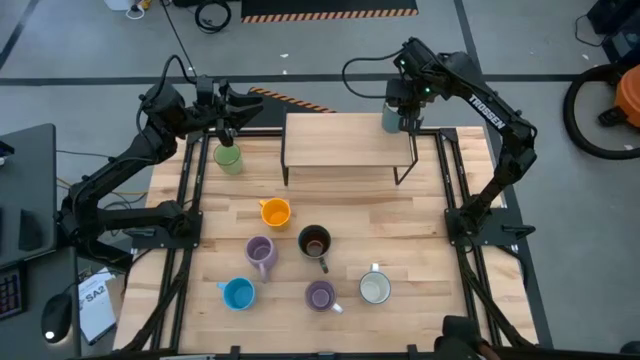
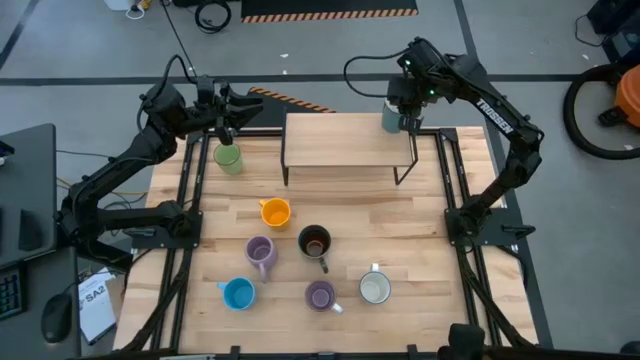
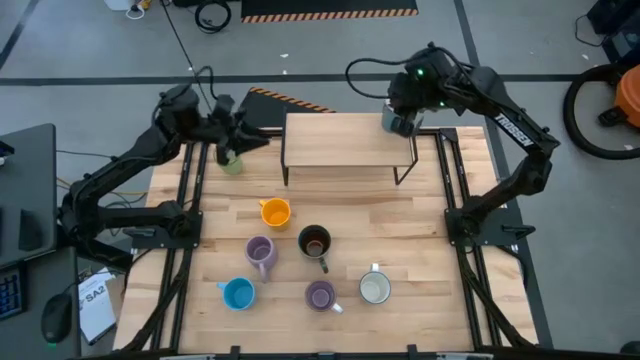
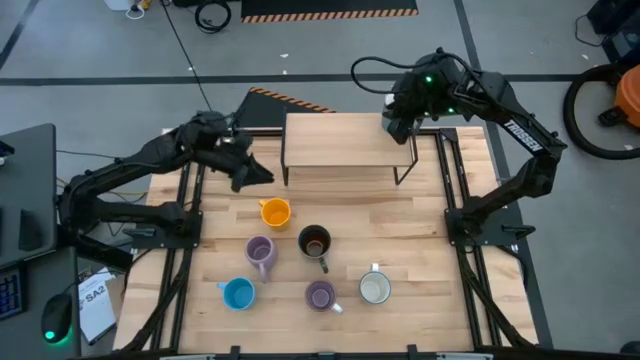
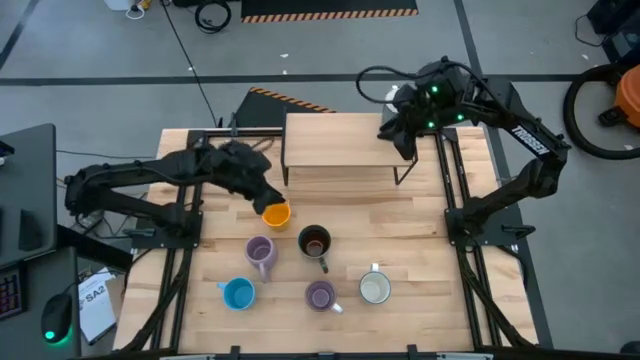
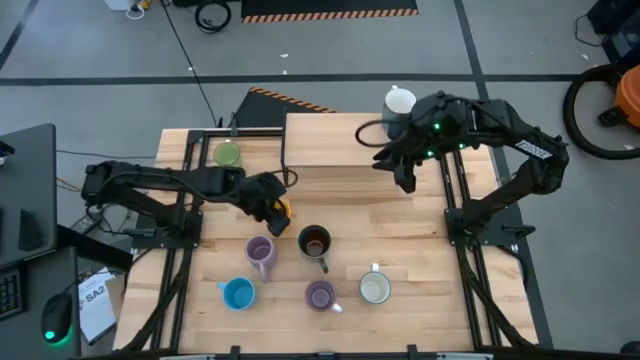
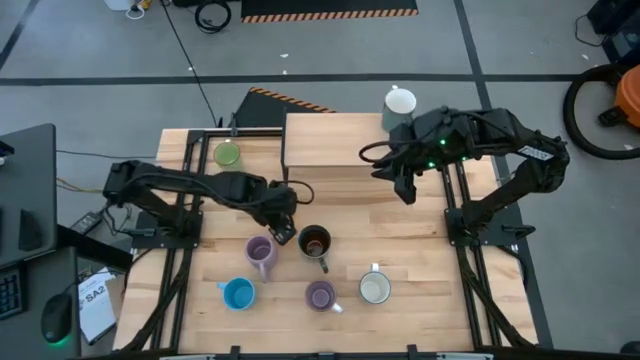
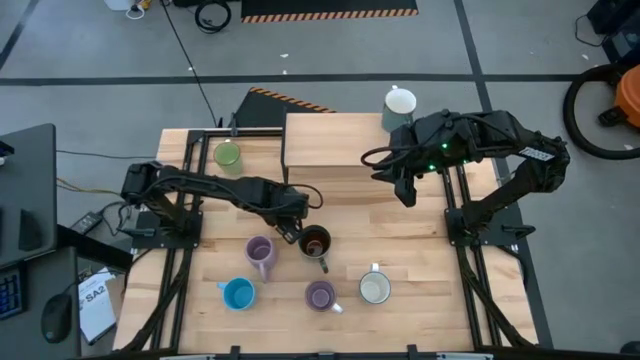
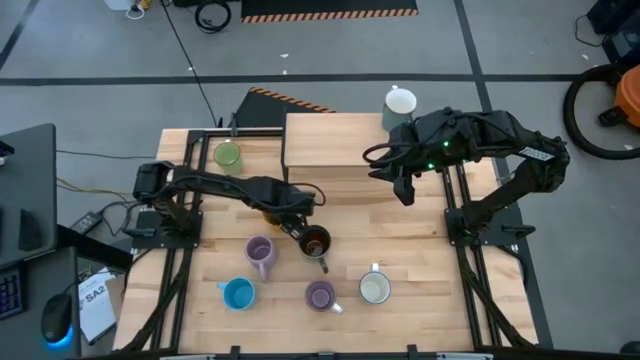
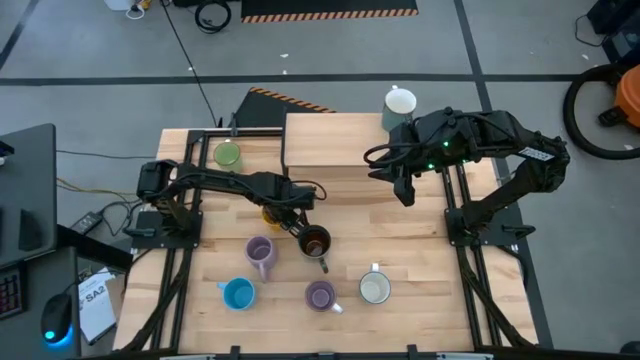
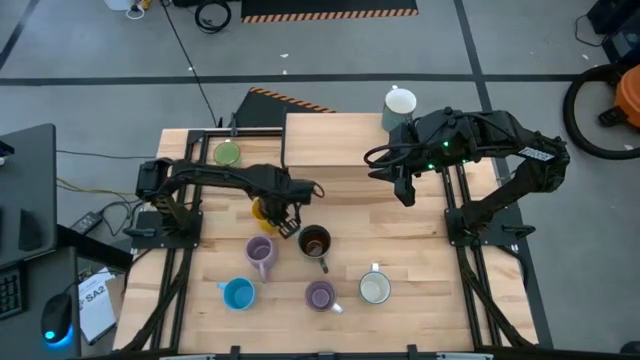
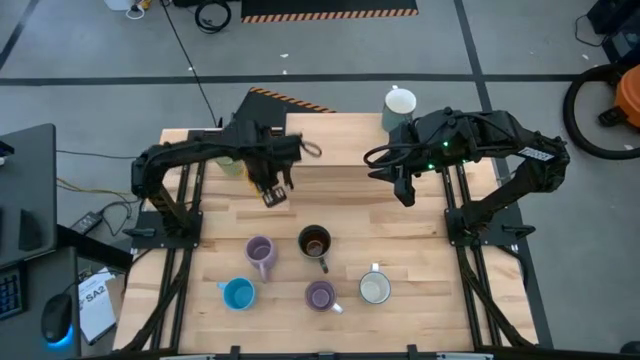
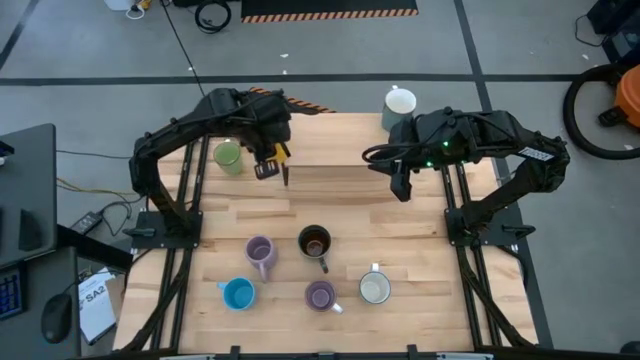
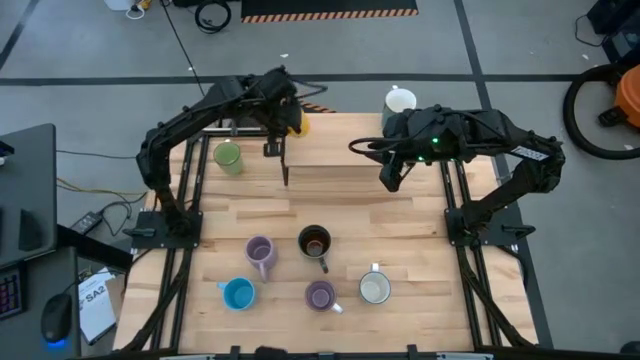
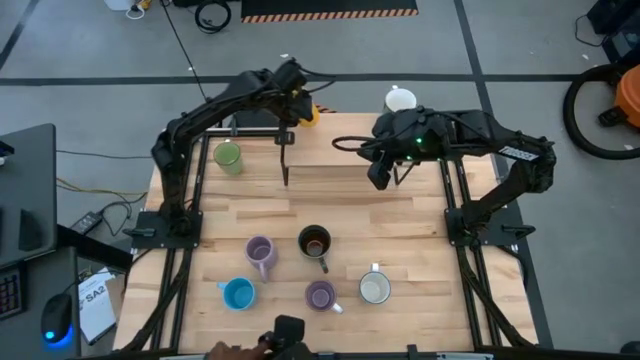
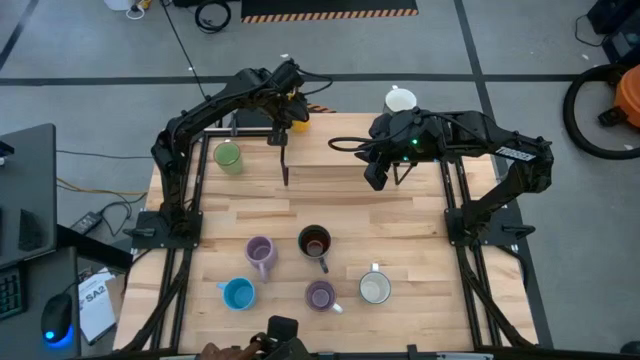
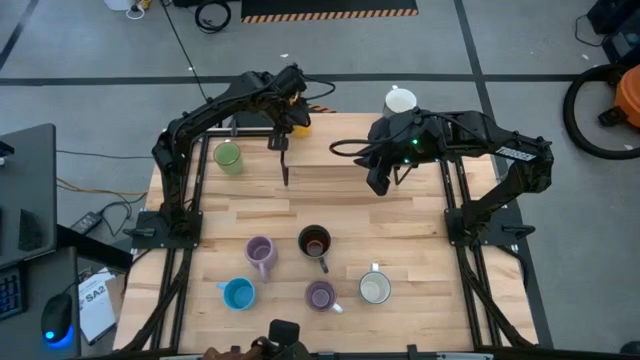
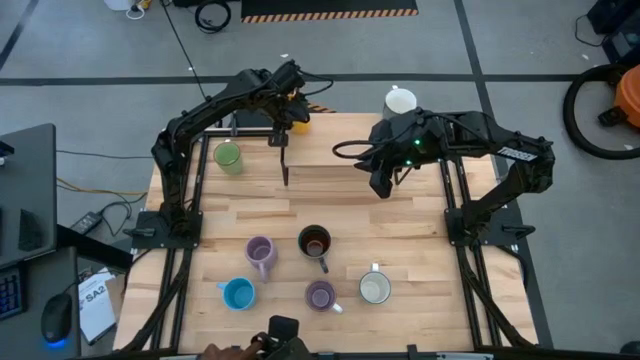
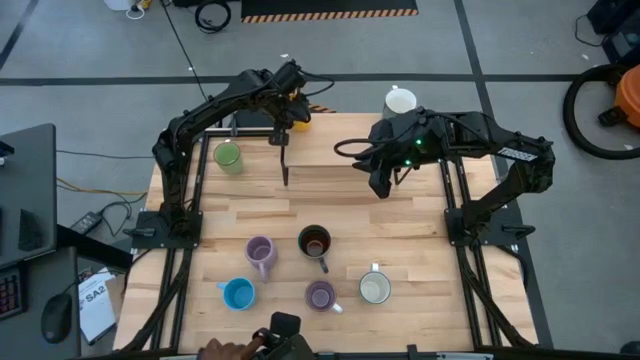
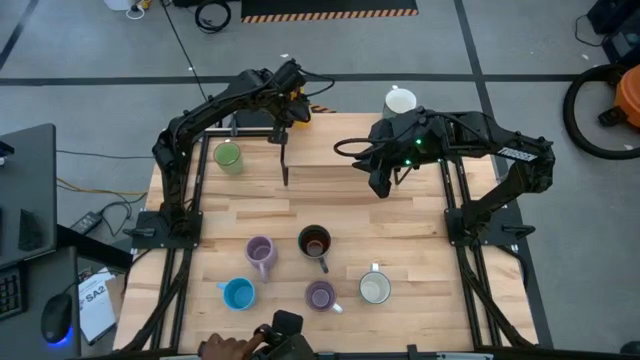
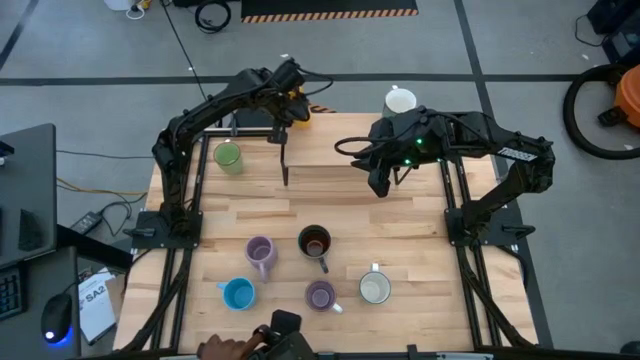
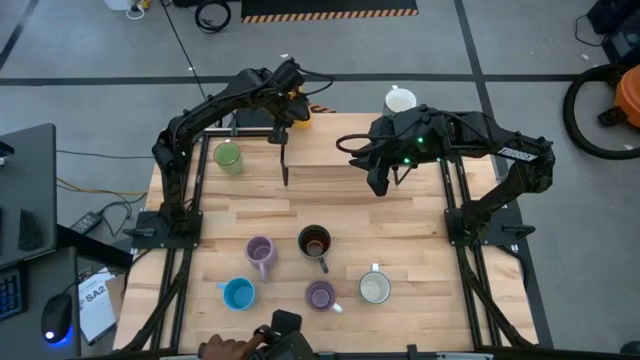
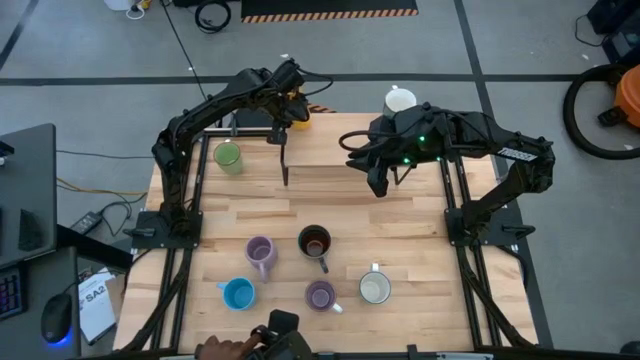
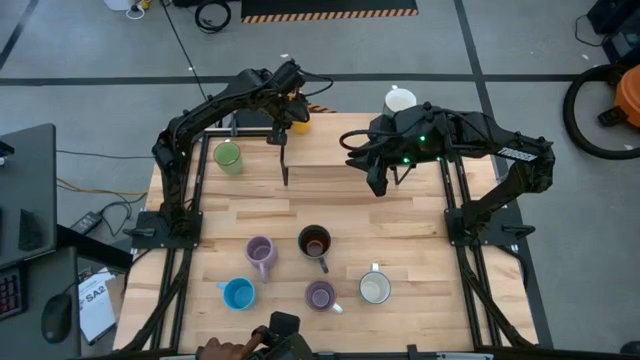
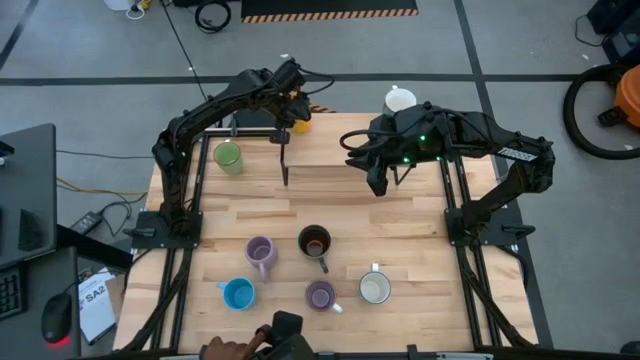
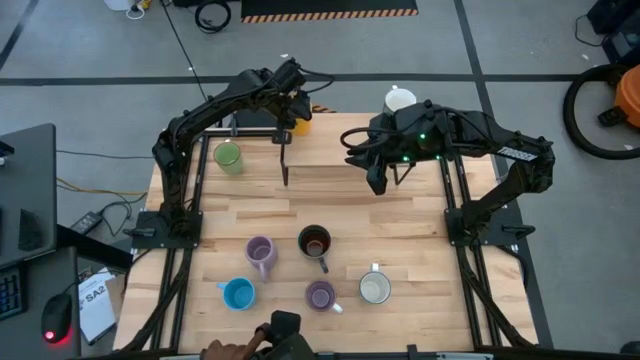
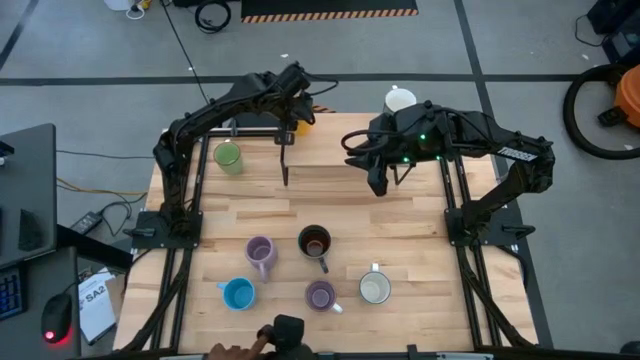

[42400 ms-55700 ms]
Task: Place coffee mugs
Put the yellow mug on the shelf

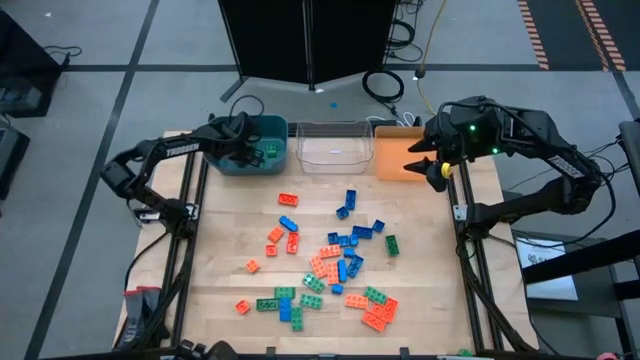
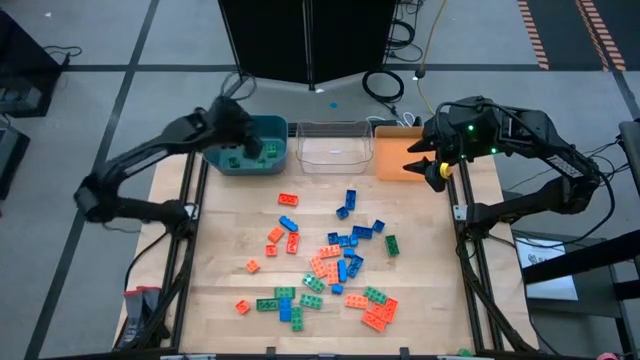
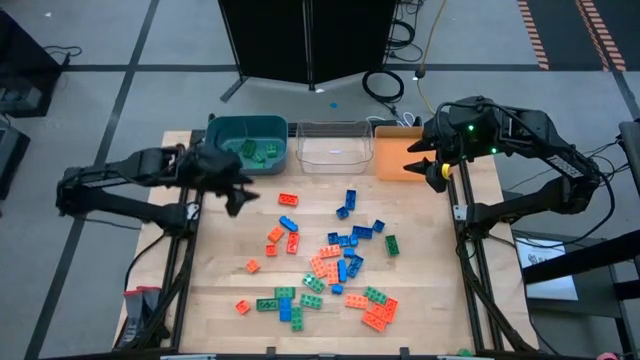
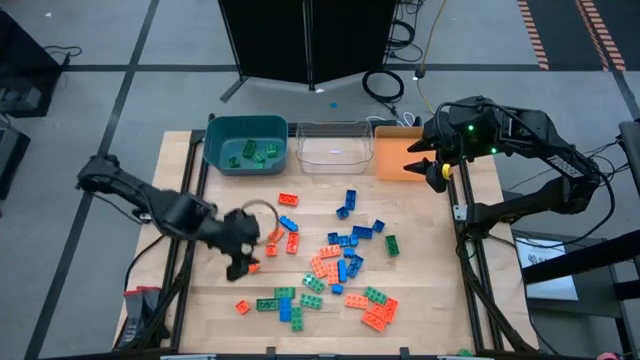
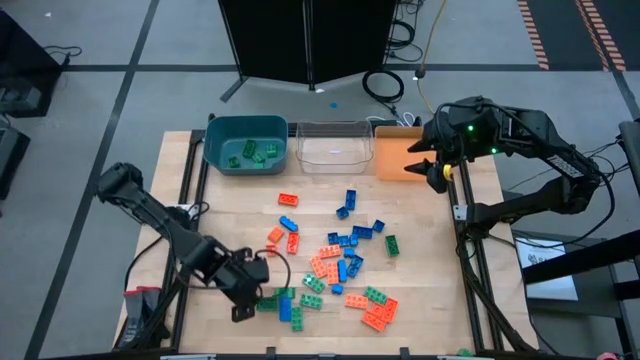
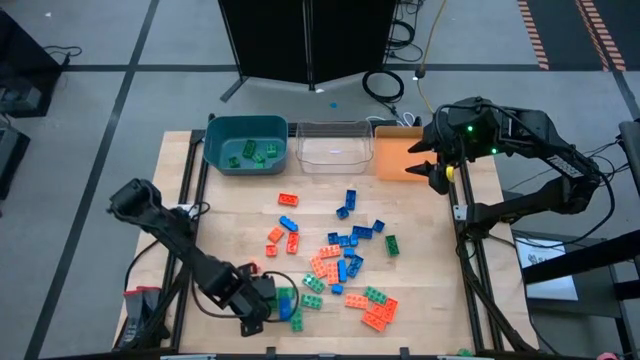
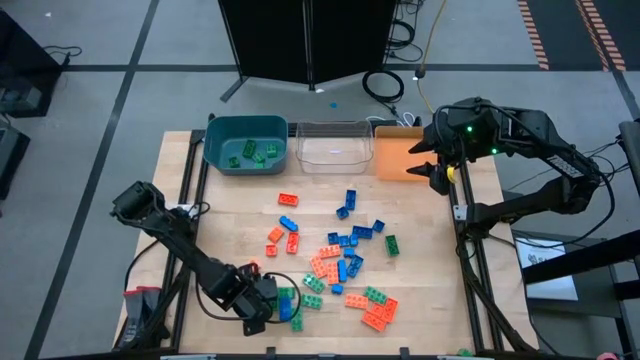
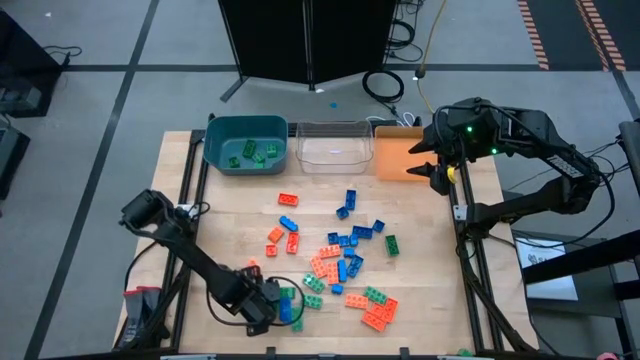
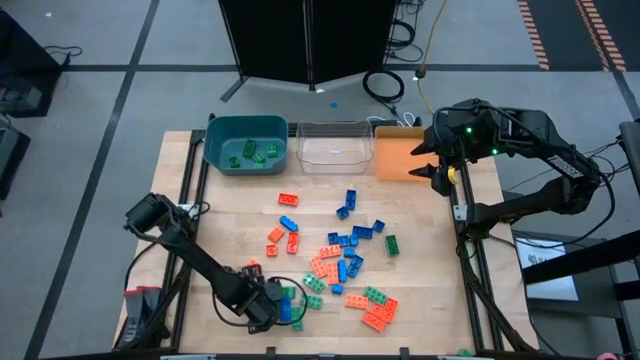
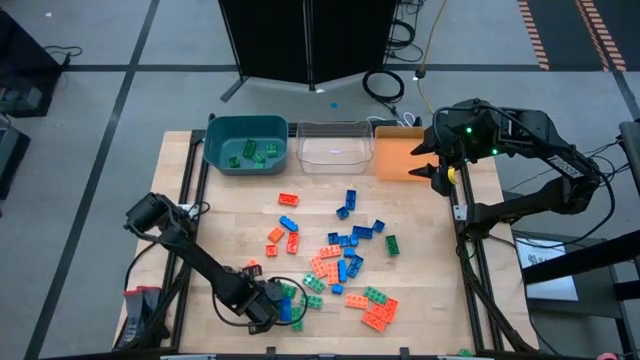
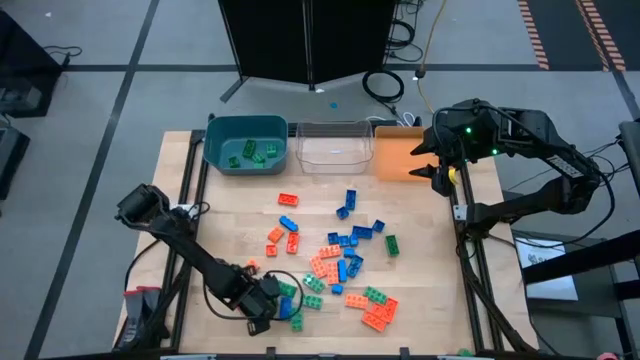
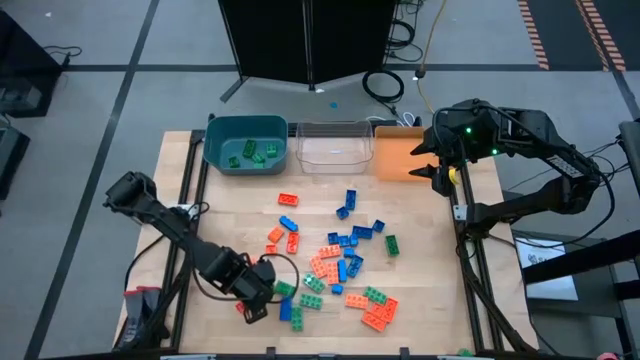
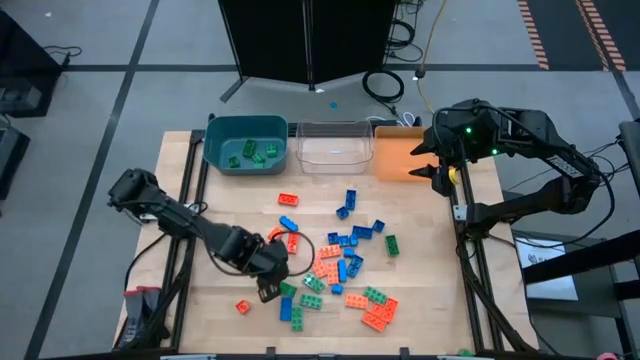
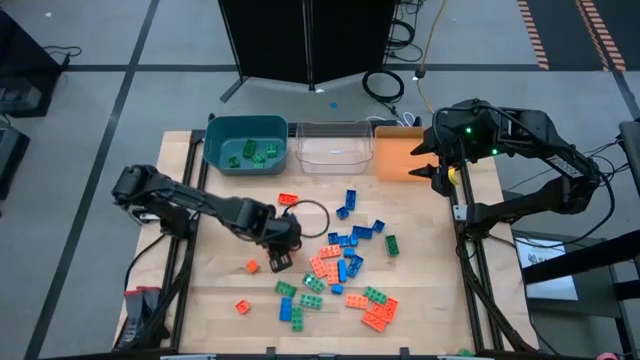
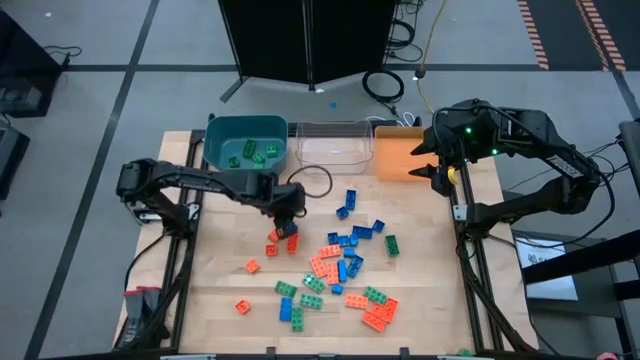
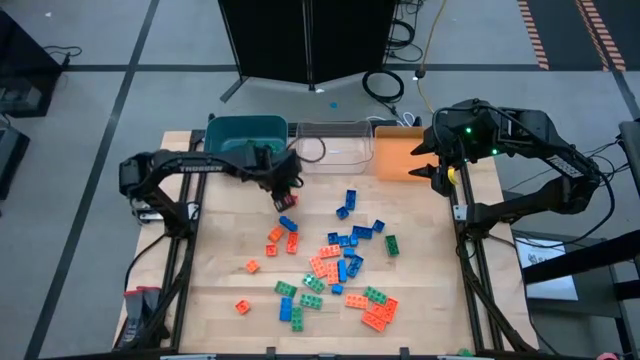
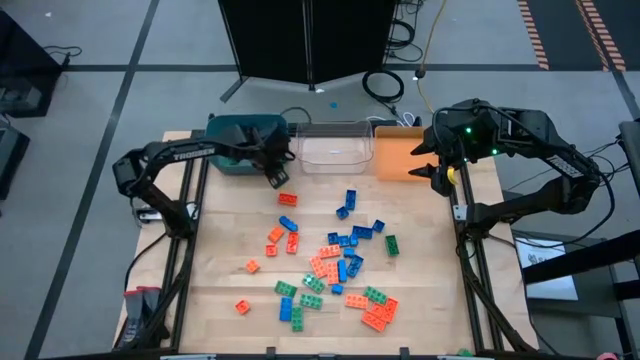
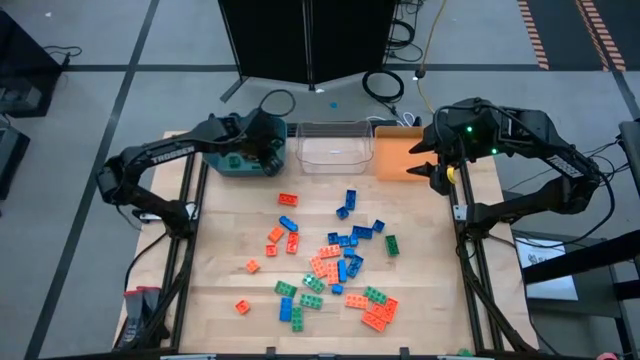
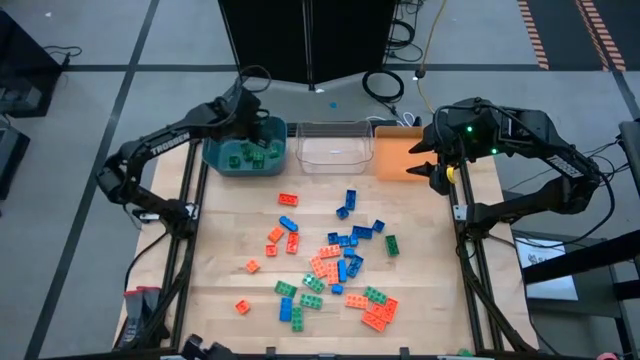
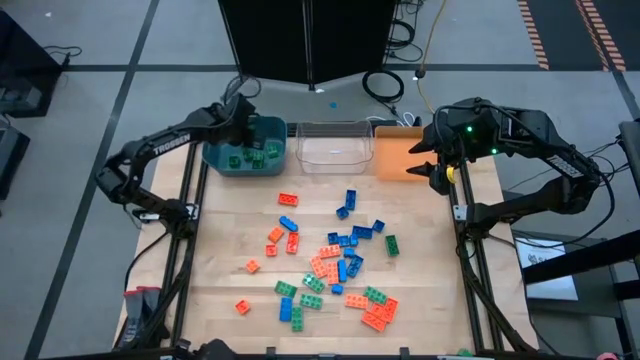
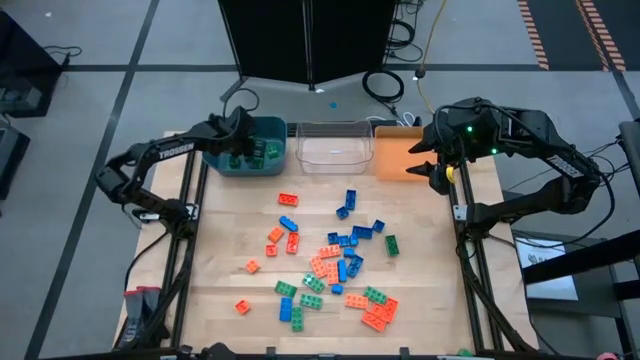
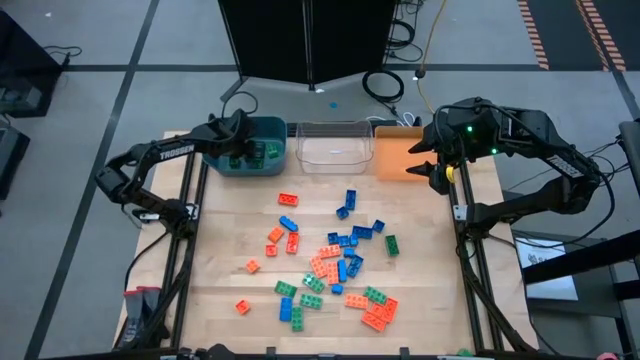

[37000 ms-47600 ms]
Task: Sort blocks
Put the green game piece into the blue bin
